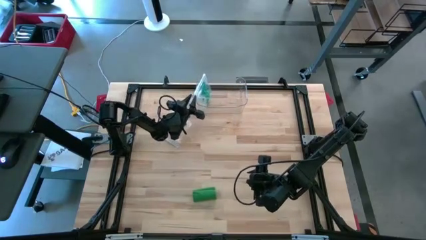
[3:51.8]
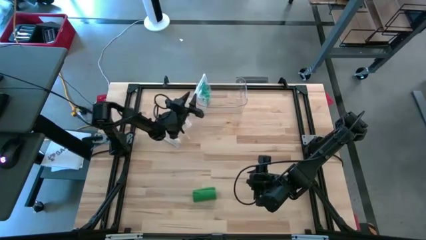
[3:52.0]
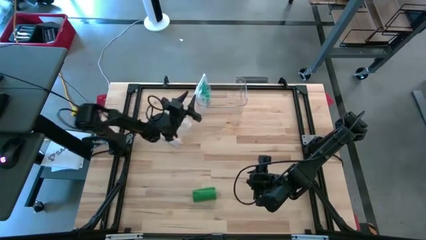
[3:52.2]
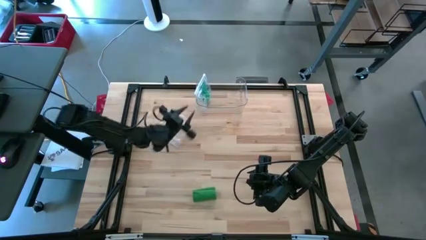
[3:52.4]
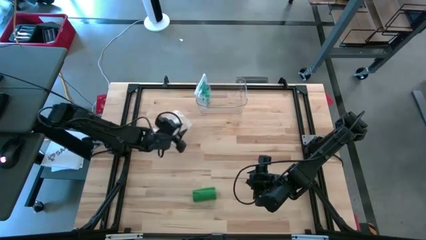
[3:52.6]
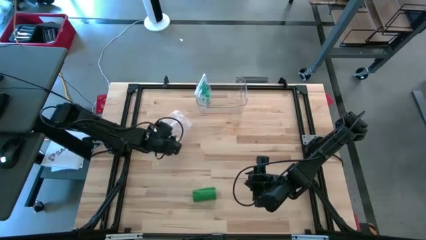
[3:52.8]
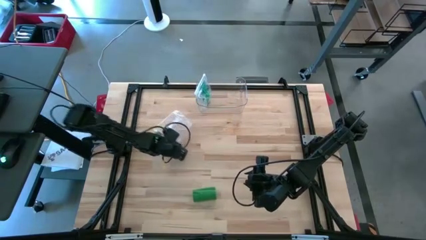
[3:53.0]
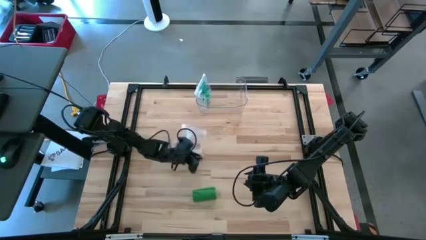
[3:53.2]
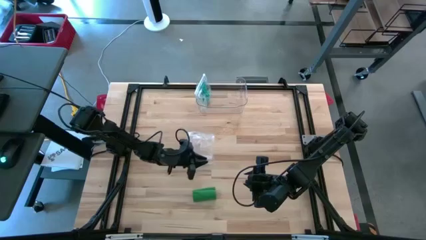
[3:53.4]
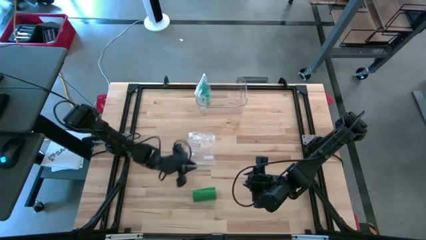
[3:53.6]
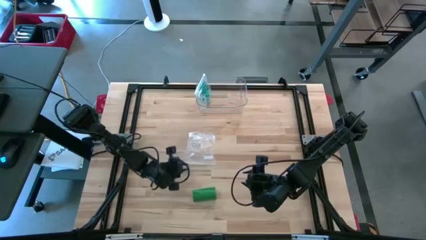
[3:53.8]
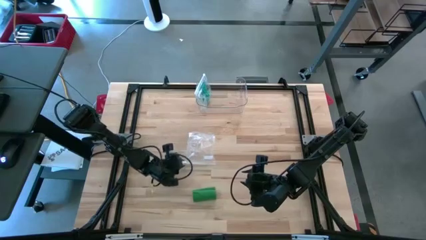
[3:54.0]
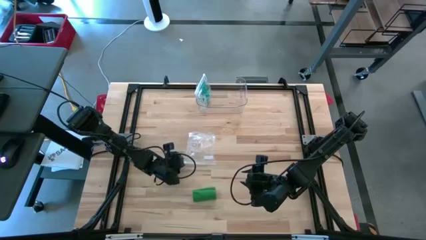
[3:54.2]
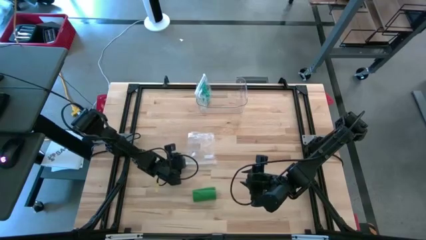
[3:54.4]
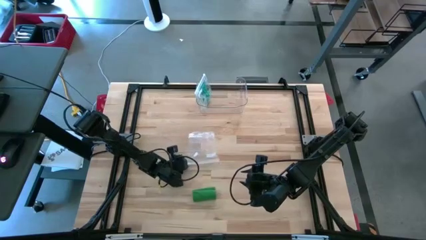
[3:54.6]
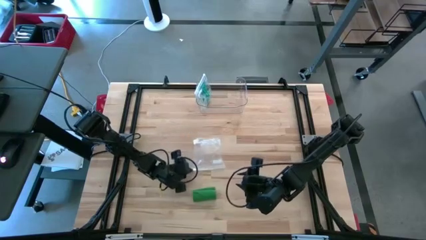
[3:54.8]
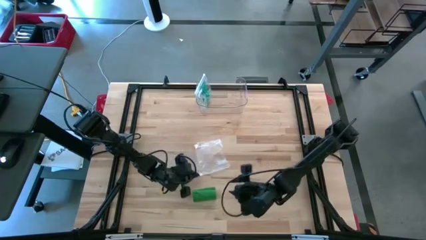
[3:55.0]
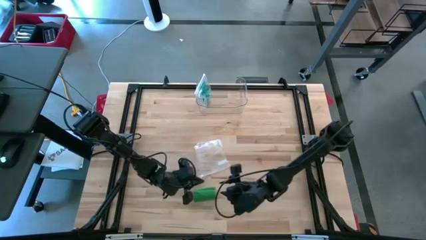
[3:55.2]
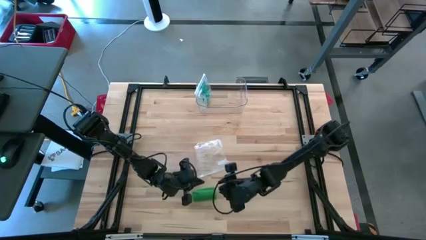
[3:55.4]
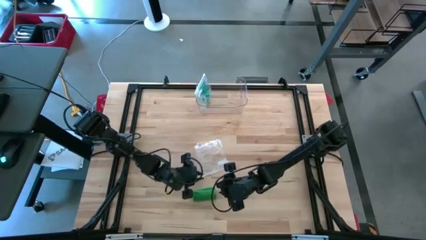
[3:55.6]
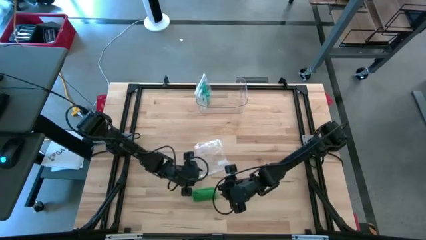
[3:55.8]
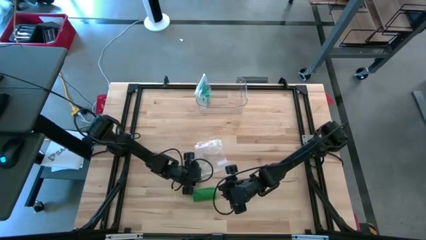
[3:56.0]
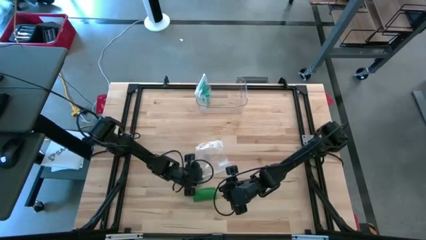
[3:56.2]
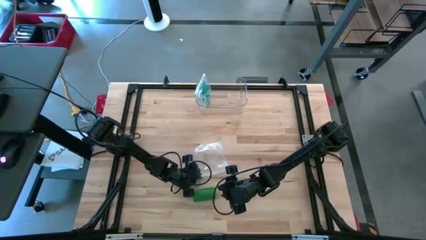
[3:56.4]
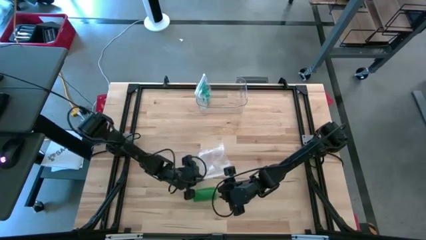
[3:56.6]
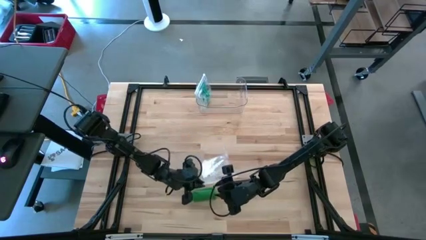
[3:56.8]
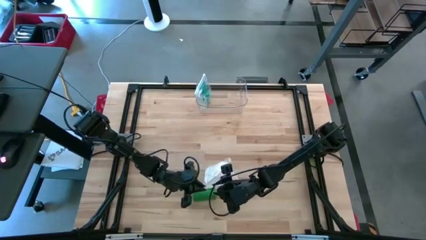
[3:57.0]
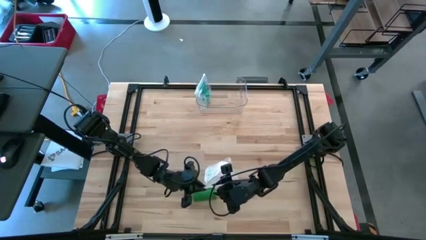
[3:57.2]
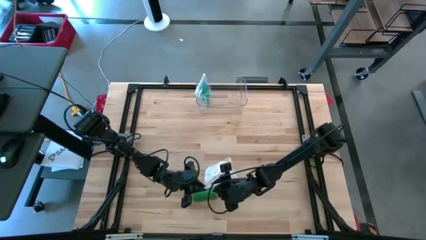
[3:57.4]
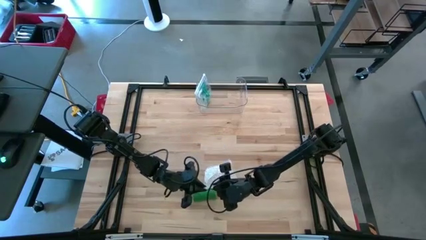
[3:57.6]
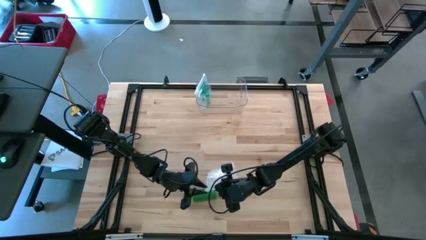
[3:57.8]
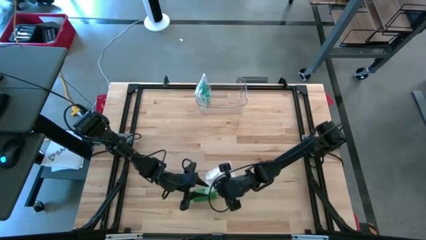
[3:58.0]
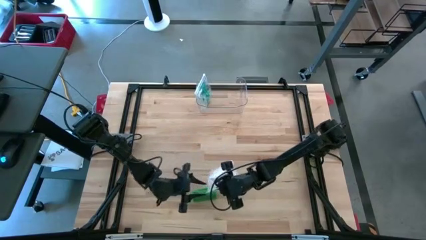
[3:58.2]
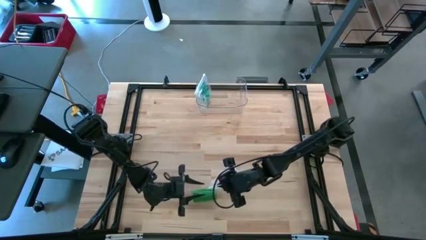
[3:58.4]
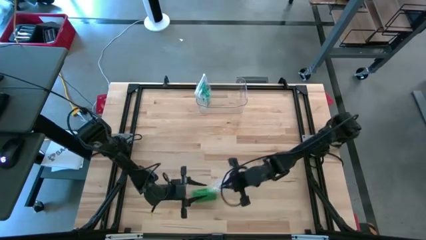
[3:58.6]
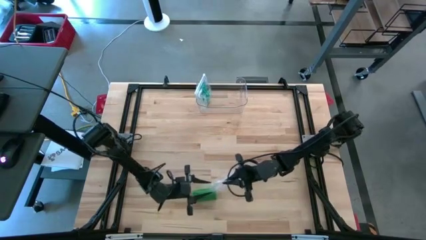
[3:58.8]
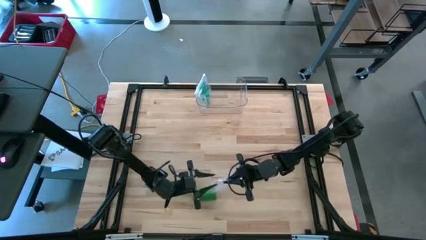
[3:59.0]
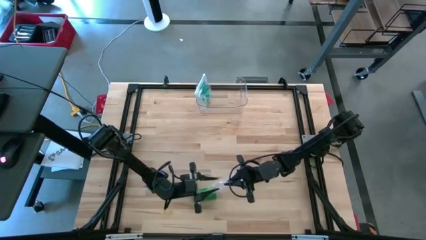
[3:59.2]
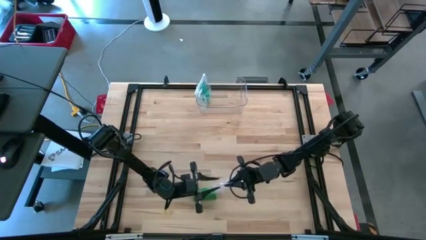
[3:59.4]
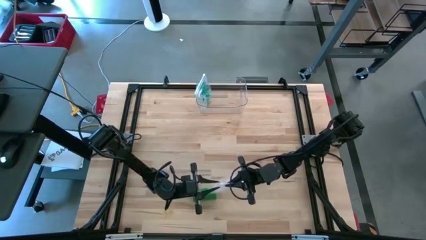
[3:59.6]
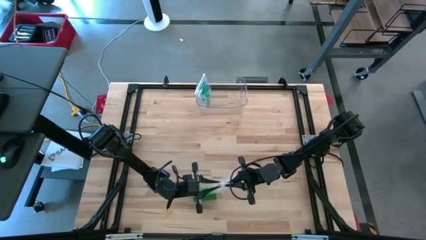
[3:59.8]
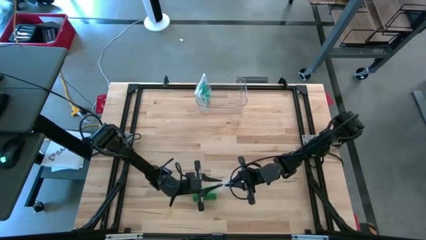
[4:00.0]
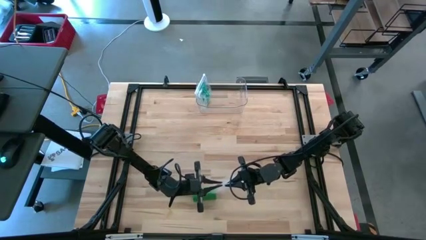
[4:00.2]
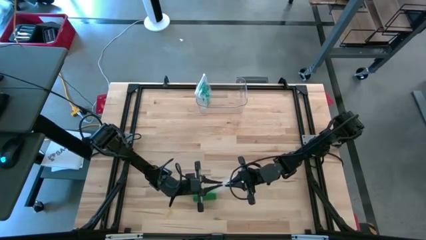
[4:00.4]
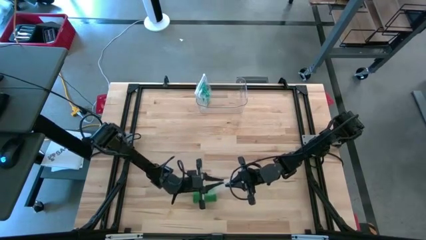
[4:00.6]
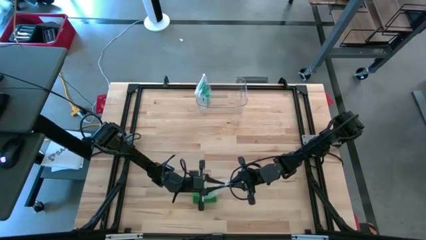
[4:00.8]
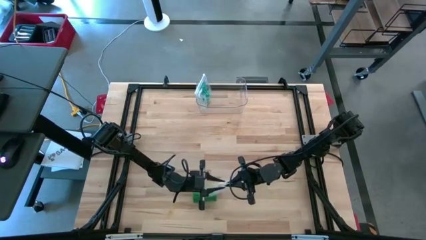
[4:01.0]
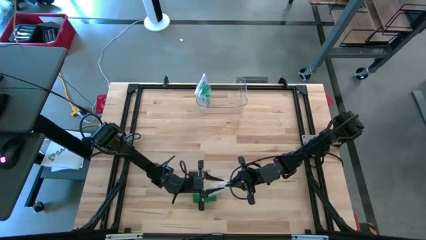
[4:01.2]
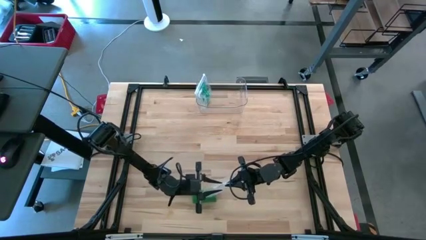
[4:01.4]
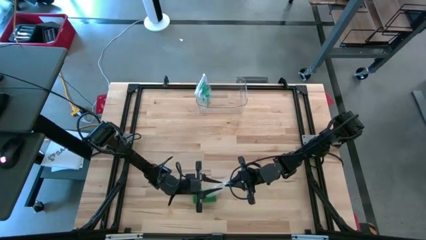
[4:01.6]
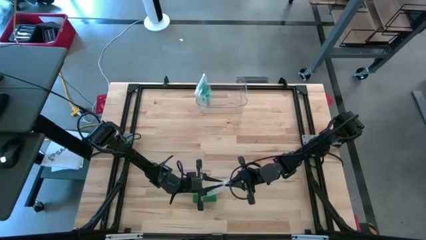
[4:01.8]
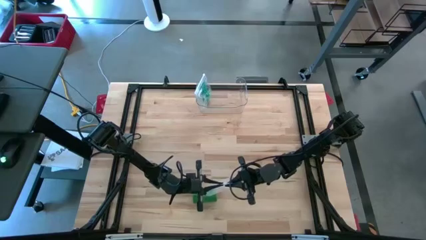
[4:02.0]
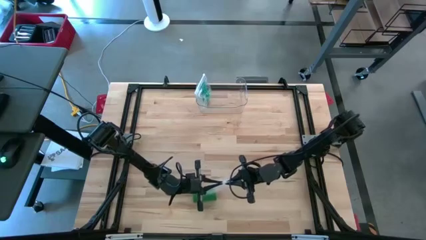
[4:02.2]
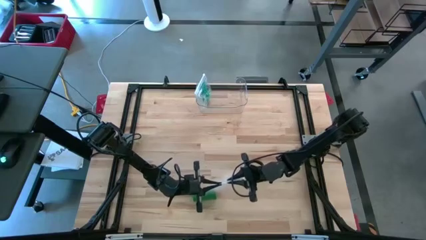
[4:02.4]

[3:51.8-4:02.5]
Task: Roll bandage
Open the transparent zip bag
